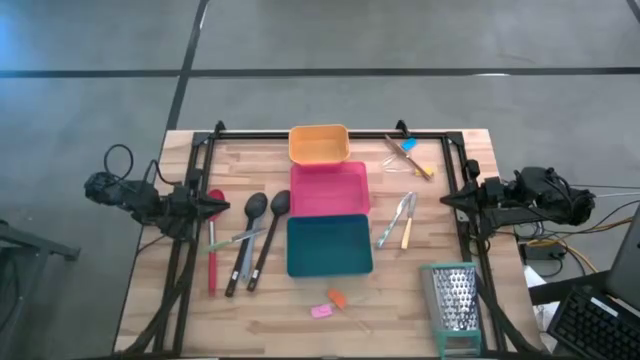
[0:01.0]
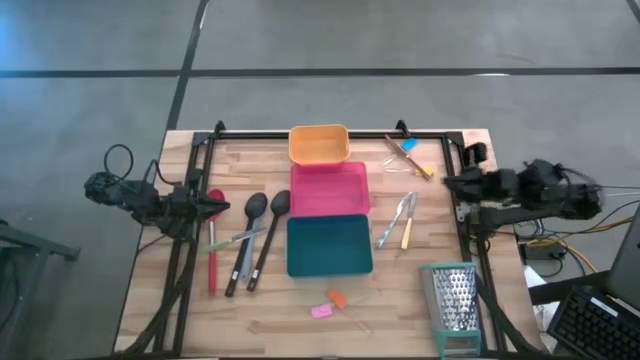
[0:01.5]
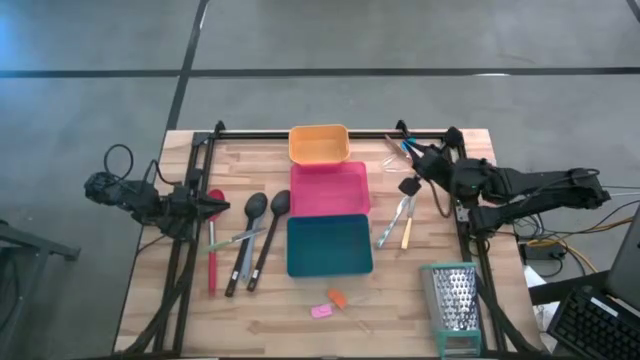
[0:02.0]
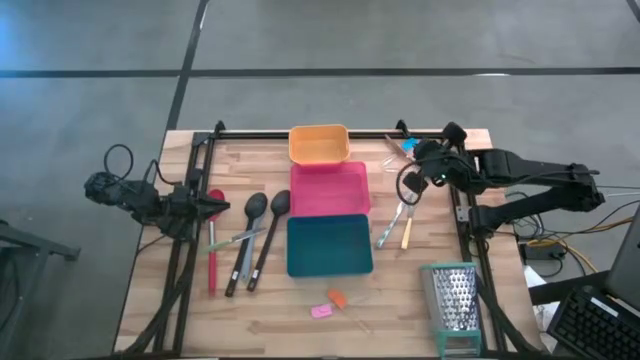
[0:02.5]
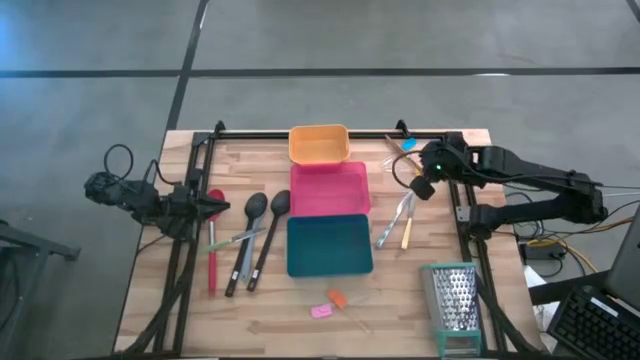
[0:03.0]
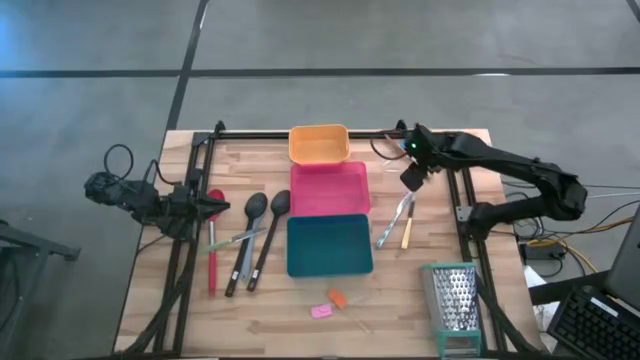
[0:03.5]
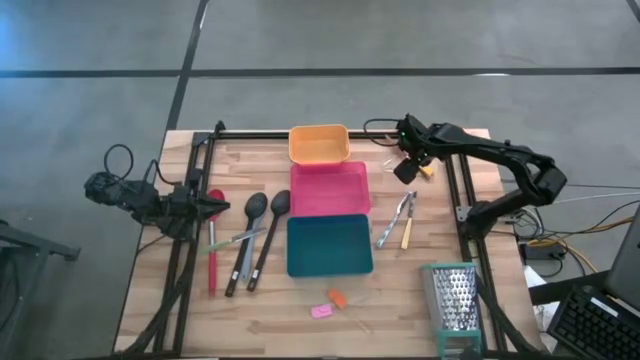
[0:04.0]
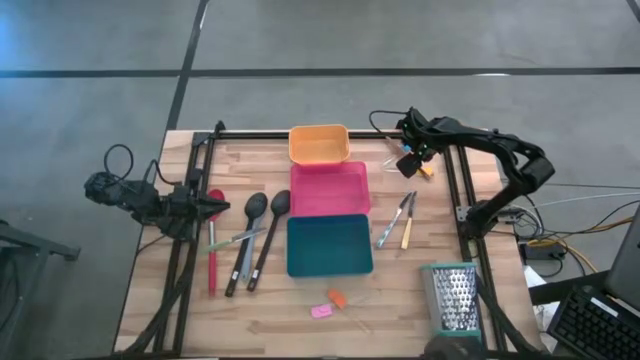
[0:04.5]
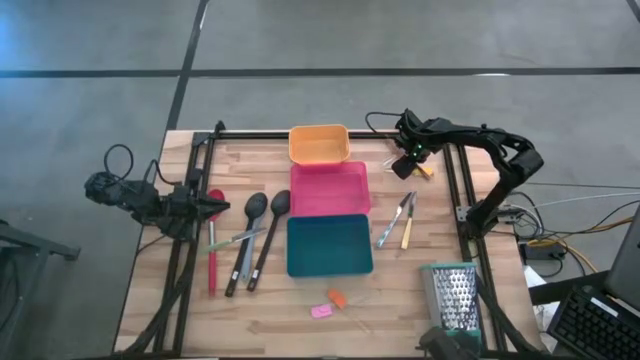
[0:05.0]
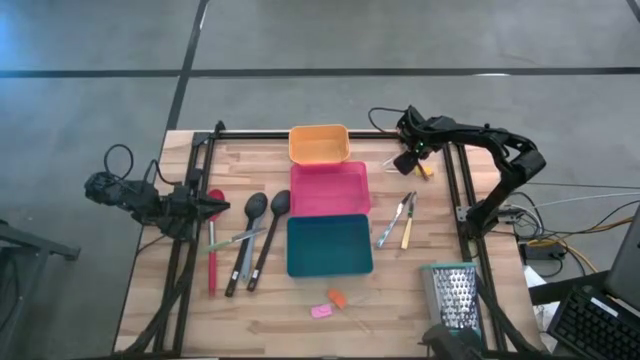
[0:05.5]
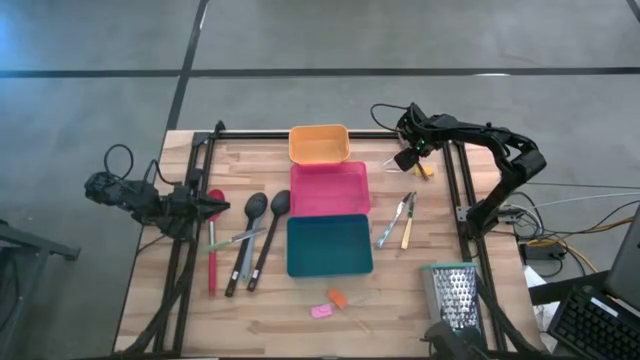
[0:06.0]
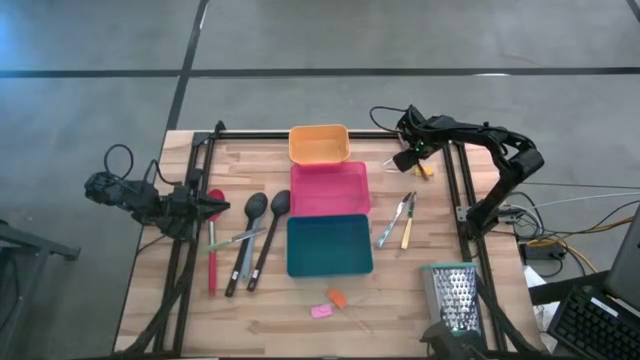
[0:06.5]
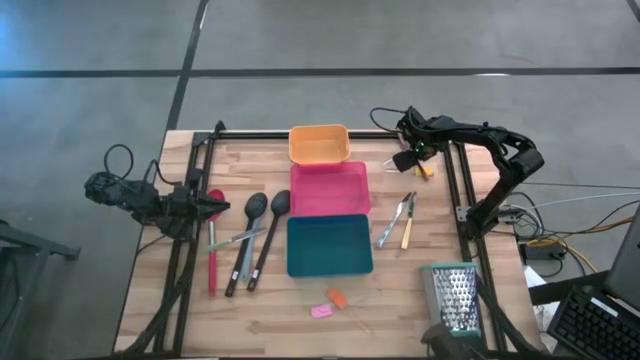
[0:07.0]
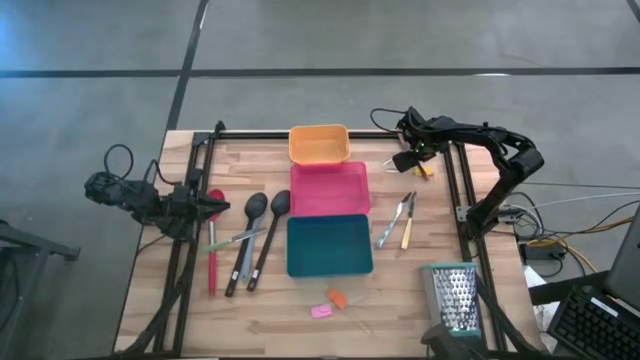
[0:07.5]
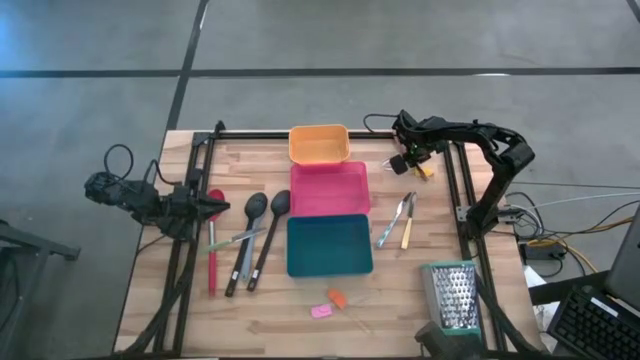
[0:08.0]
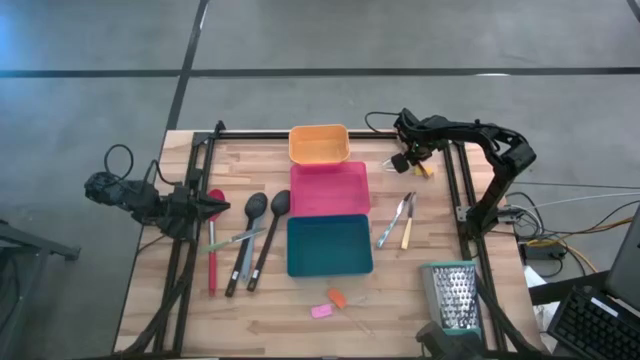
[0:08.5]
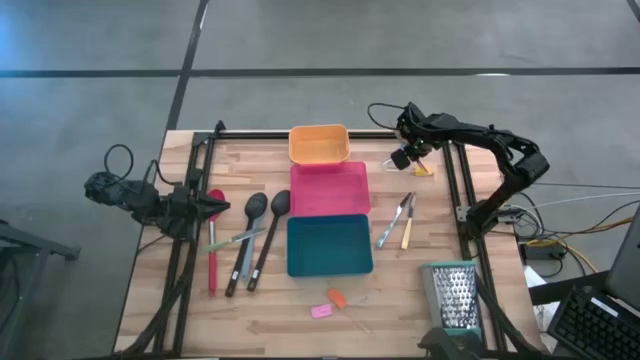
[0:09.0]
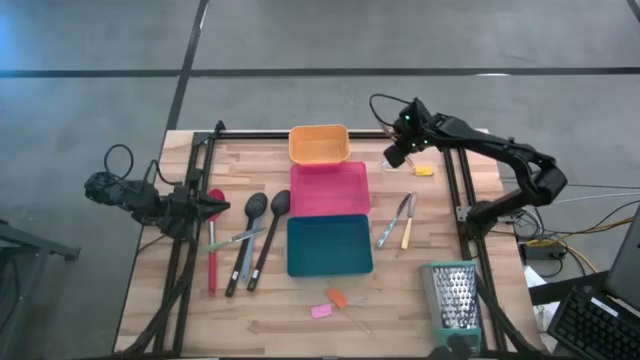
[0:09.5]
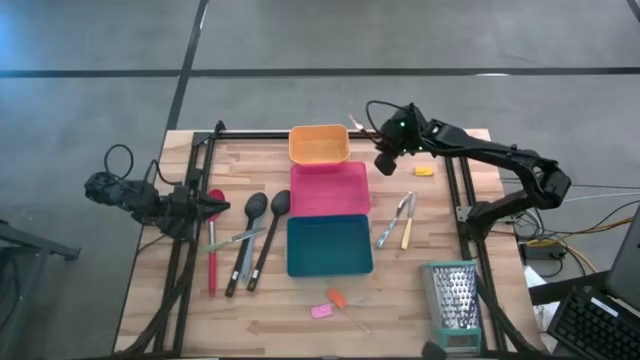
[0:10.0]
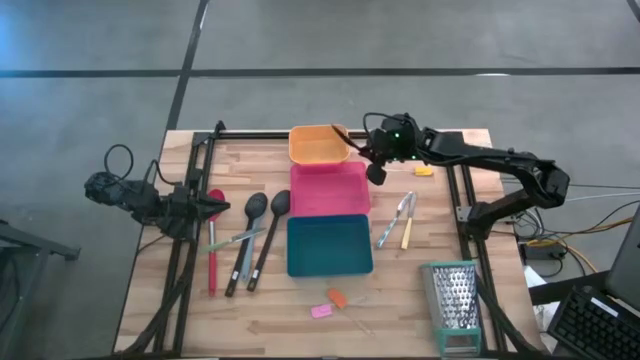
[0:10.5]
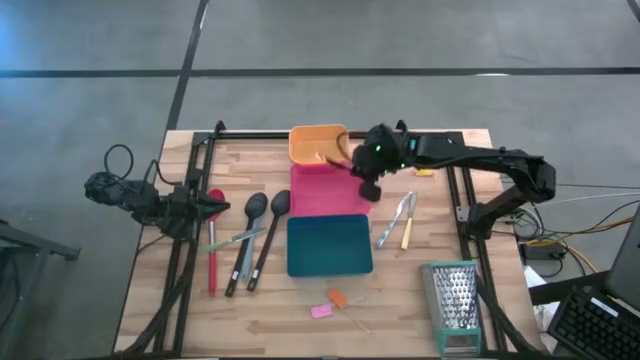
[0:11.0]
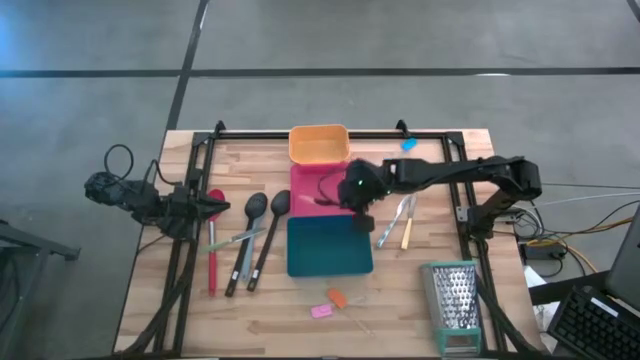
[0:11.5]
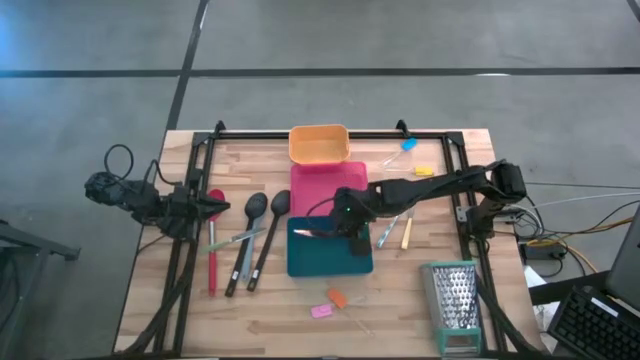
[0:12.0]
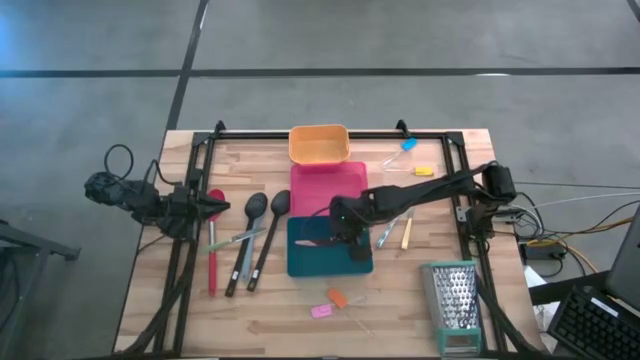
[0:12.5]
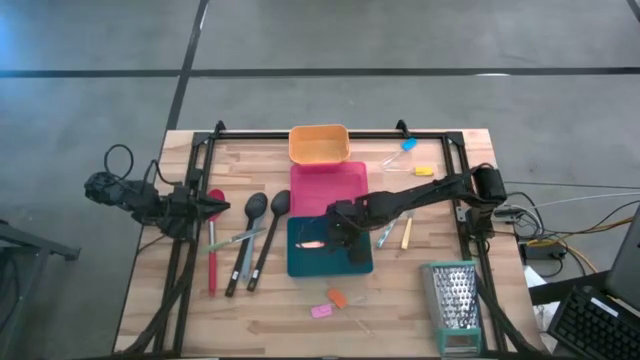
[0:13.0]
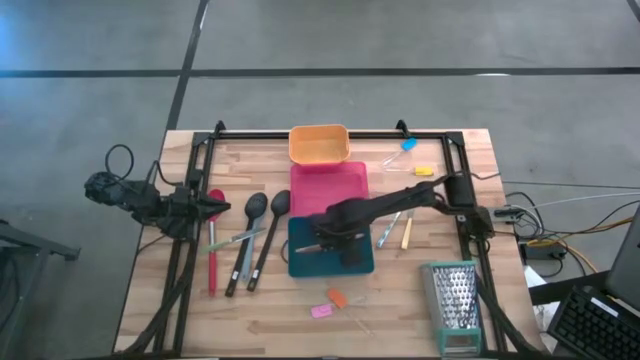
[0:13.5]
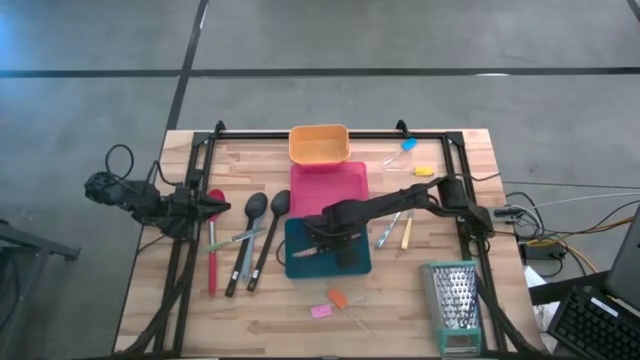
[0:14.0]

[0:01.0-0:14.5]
Task: Pick & Place Kitchen Items
Put the gold knife into the blue bin

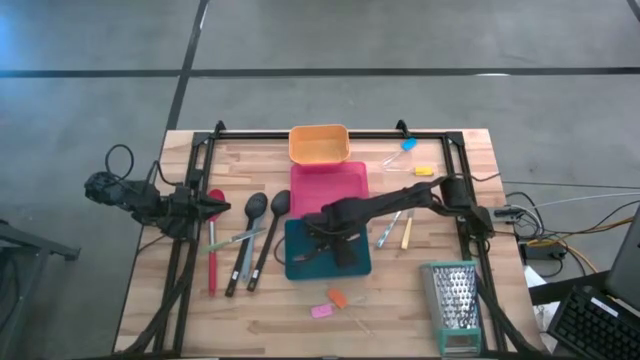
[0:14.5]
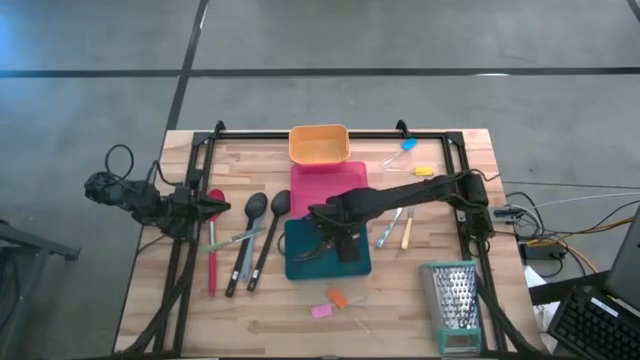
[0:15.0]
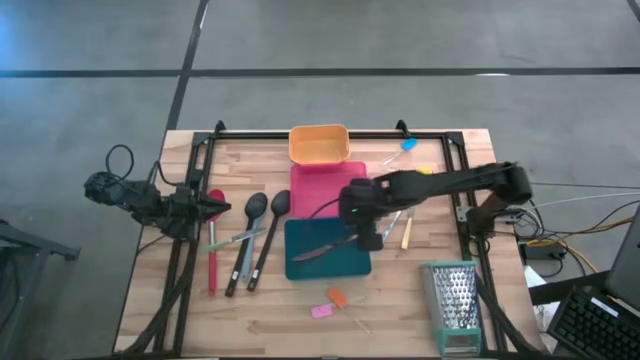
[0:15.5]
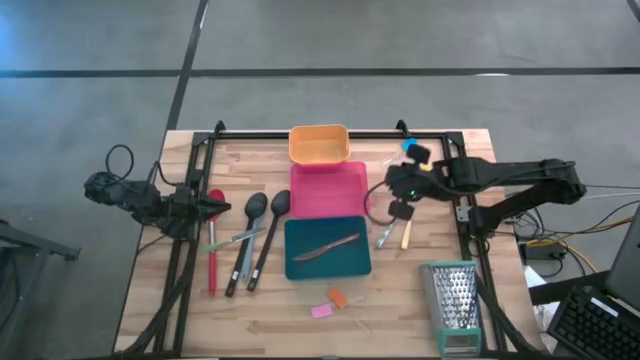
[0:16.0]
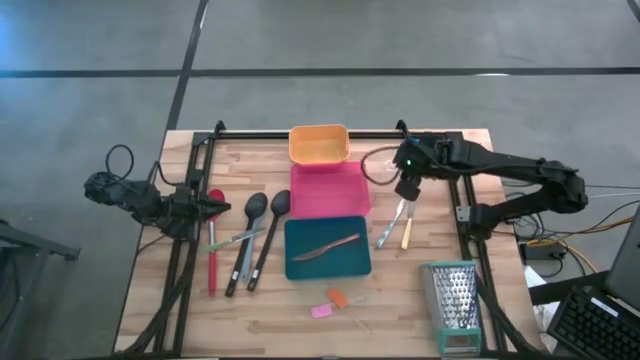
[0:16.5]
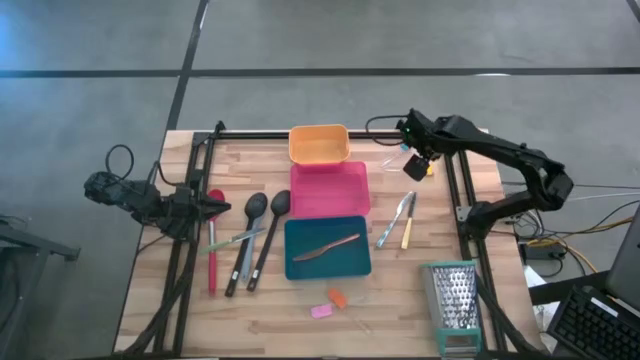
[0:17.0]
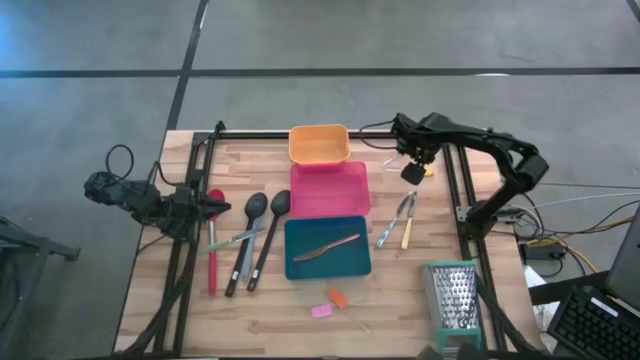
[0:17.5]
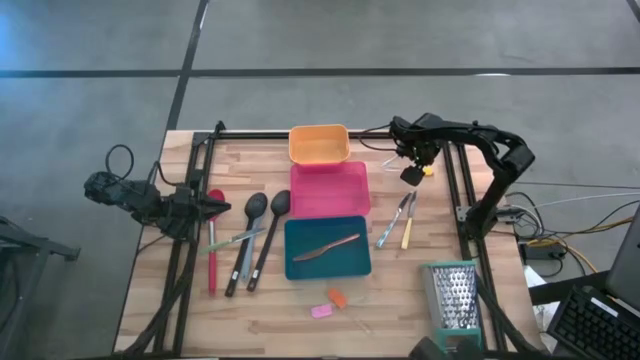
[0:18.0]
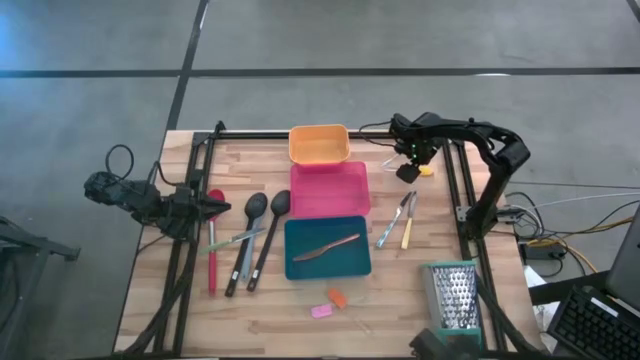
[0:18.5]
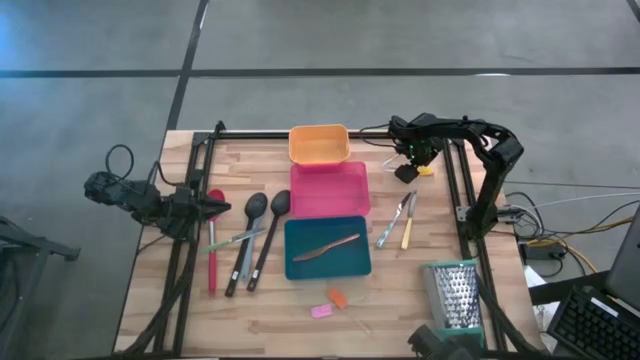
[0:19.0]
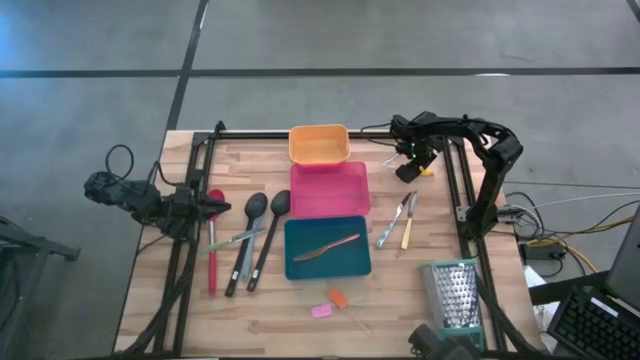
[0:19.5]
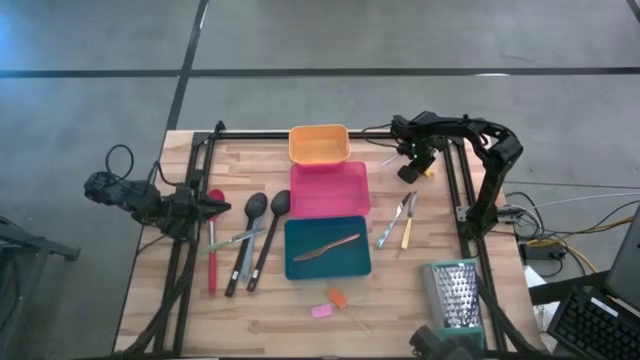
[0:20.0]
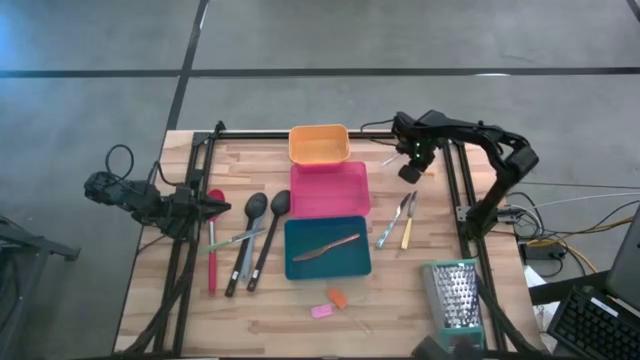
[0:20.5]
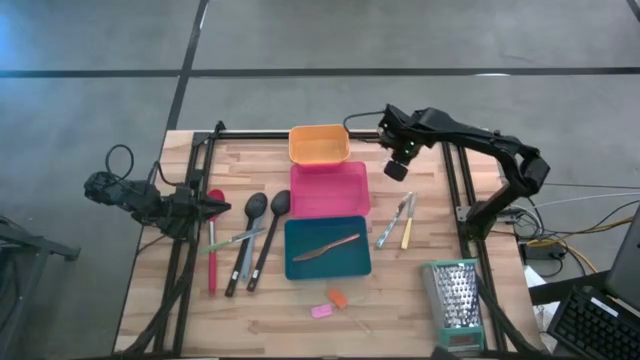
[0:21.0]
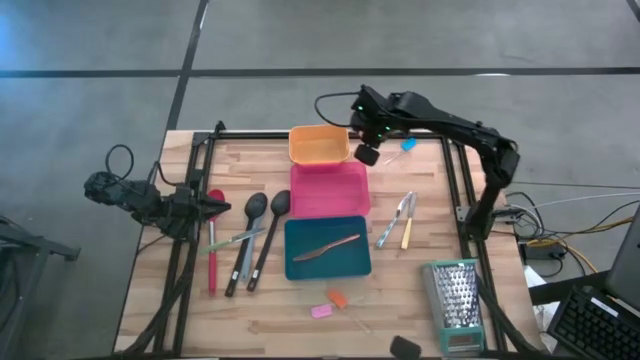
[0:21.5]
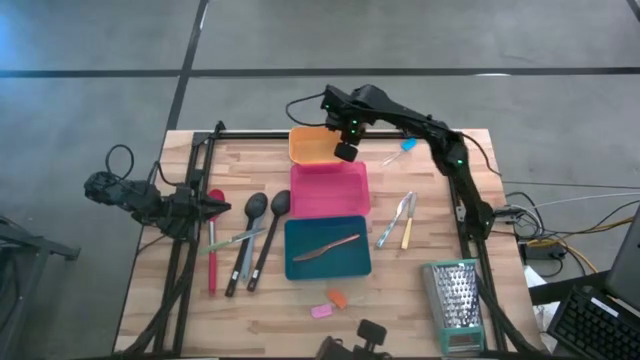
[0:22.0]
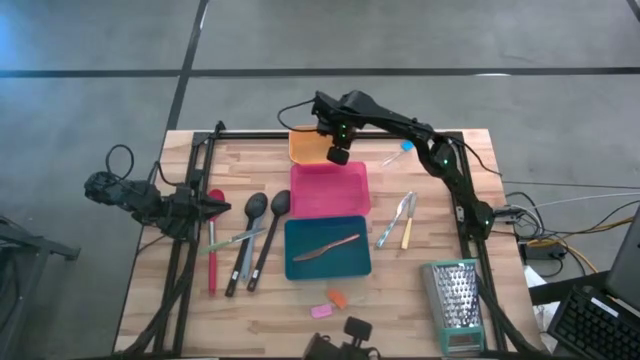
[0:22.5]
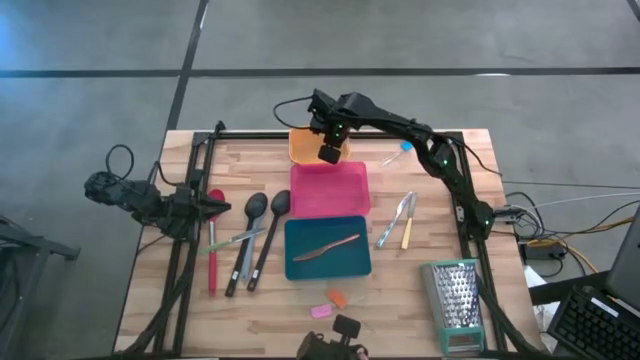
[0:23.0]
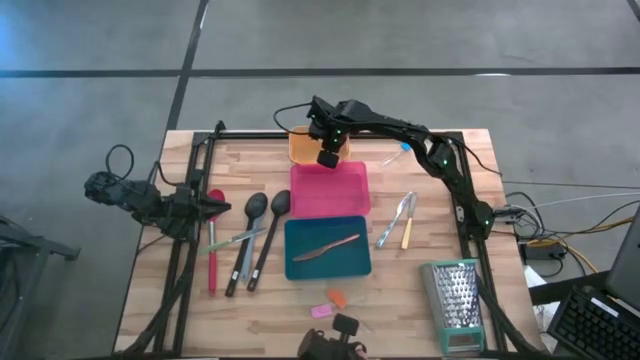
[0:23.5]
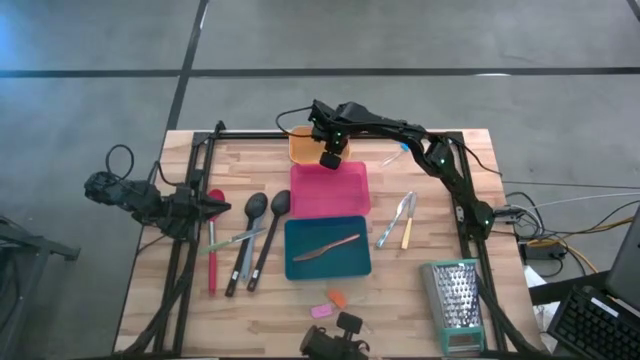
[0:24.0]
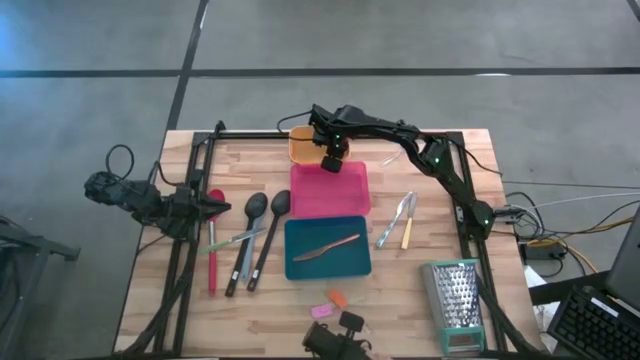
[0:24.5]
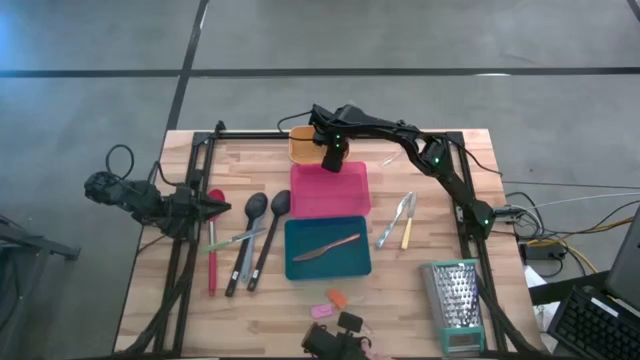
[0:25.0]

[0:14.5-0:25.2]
Put the yellow spatula into the yellow bin
